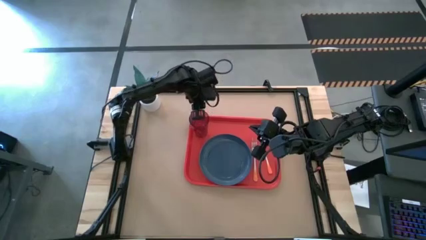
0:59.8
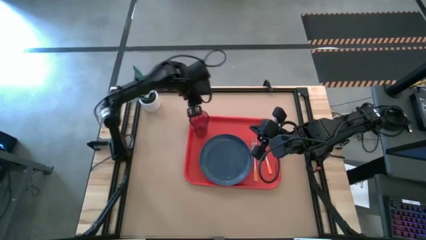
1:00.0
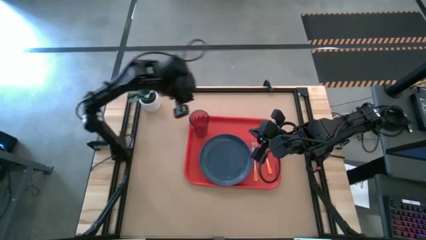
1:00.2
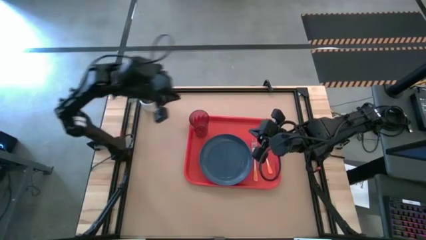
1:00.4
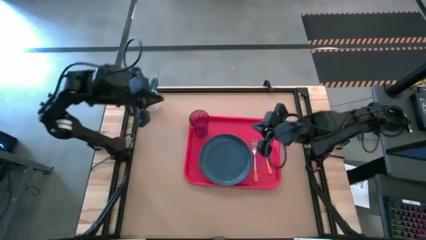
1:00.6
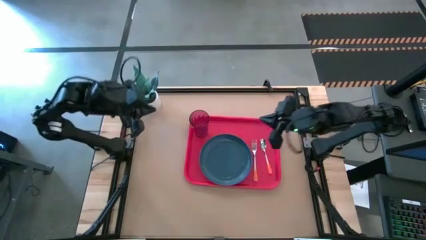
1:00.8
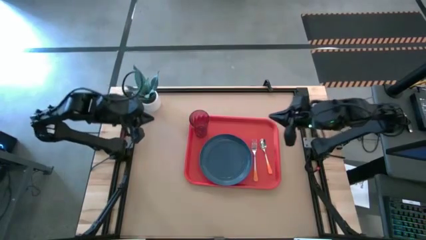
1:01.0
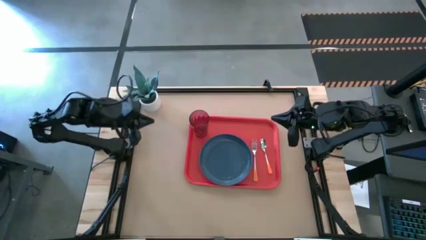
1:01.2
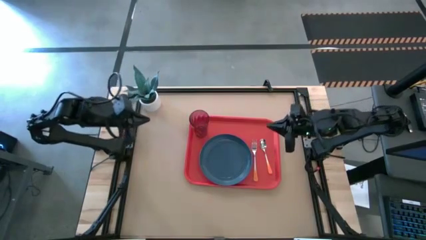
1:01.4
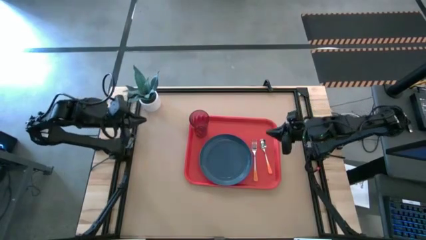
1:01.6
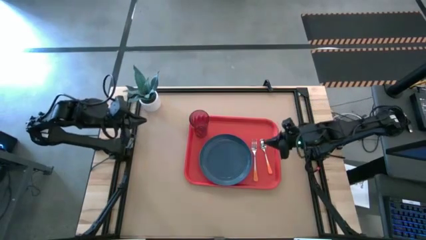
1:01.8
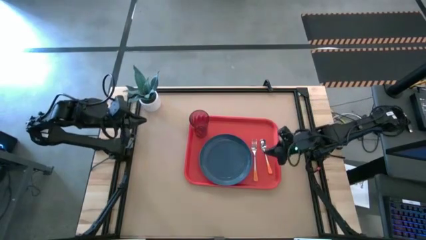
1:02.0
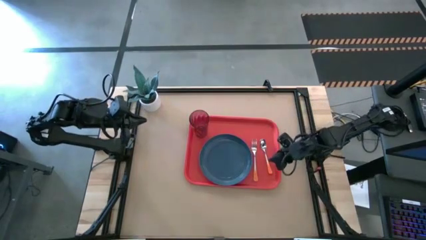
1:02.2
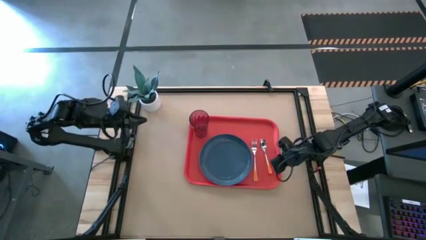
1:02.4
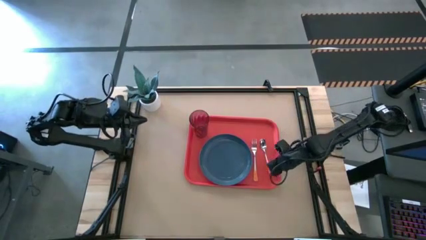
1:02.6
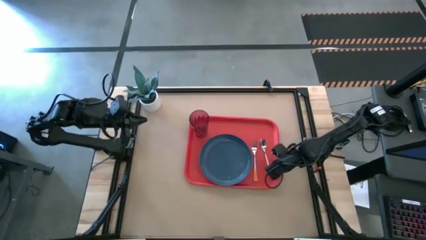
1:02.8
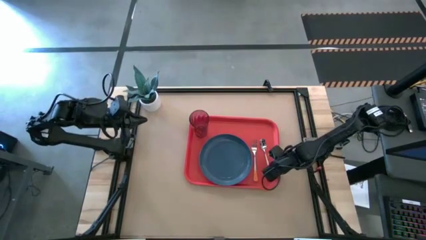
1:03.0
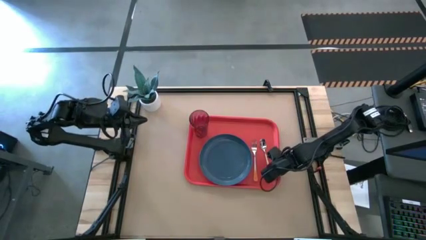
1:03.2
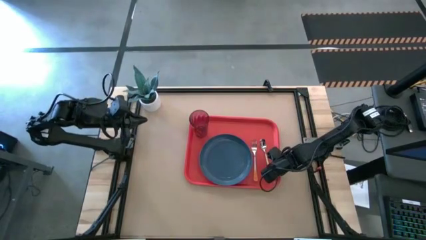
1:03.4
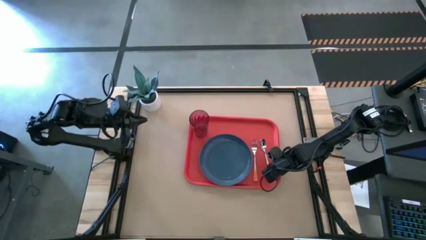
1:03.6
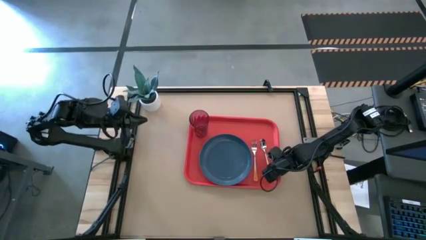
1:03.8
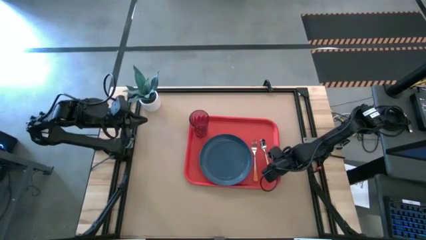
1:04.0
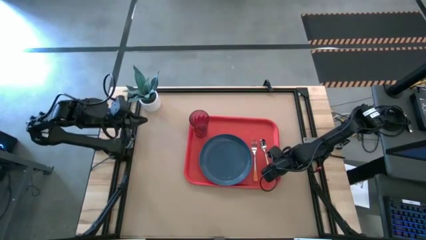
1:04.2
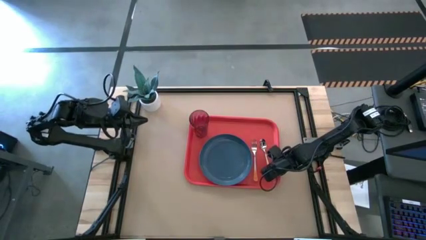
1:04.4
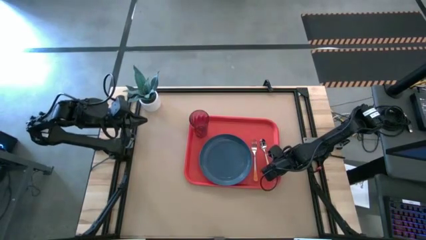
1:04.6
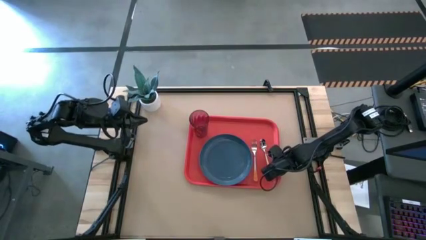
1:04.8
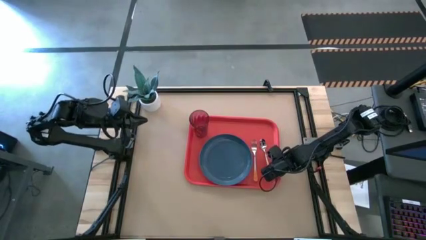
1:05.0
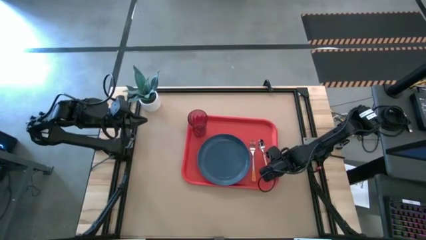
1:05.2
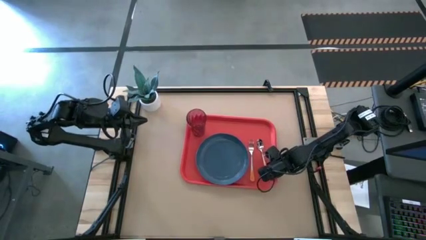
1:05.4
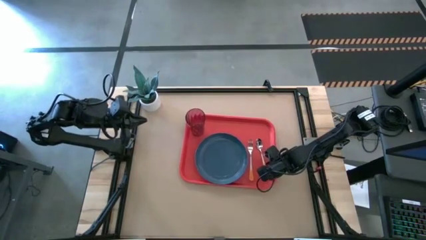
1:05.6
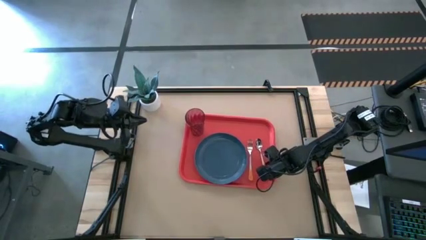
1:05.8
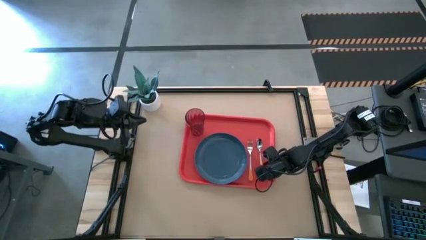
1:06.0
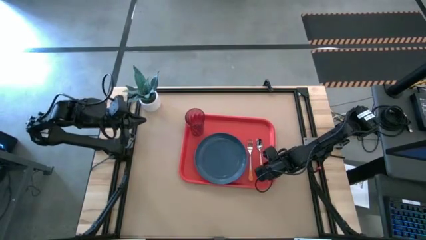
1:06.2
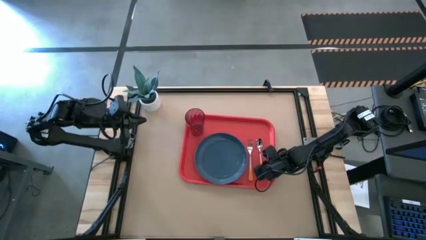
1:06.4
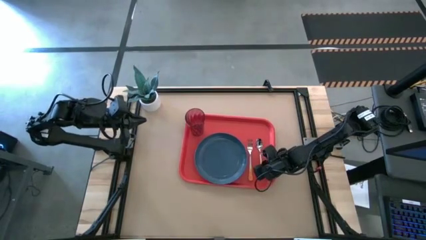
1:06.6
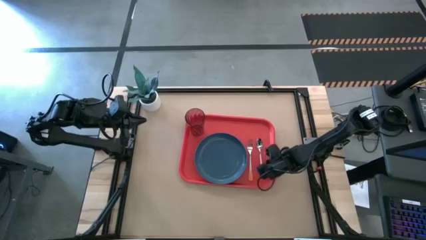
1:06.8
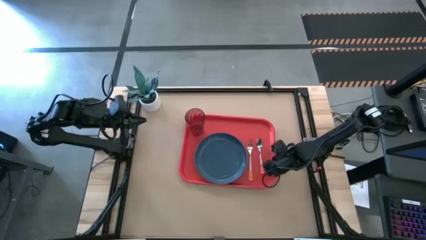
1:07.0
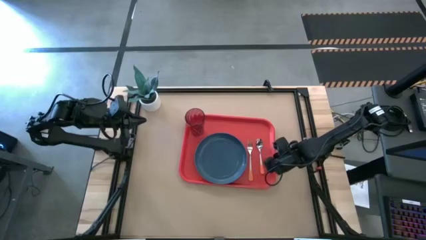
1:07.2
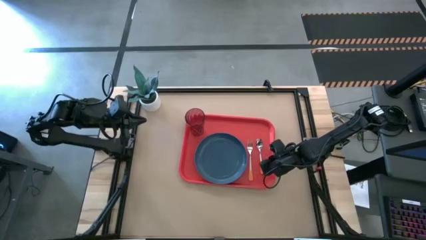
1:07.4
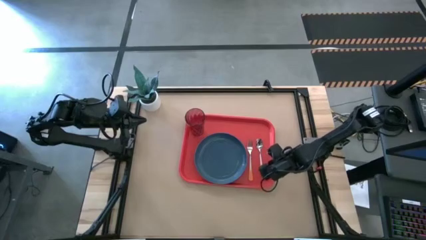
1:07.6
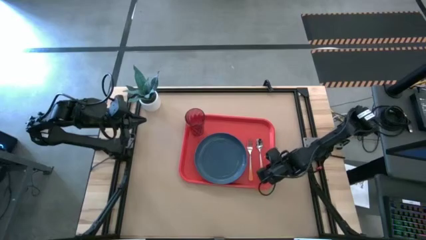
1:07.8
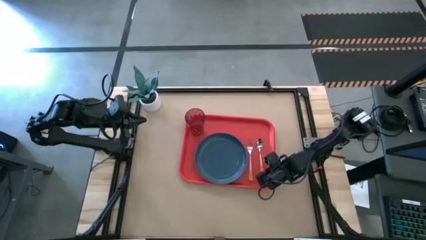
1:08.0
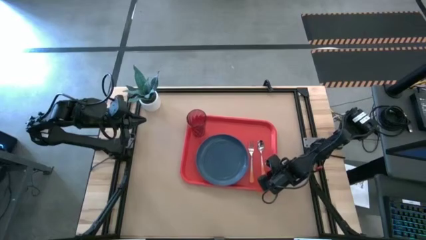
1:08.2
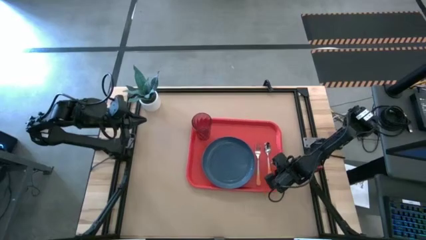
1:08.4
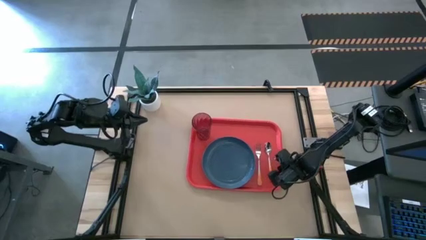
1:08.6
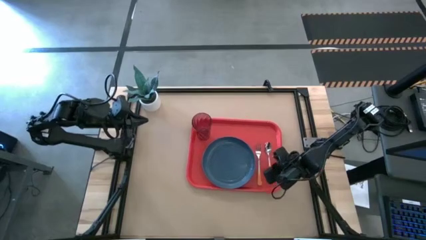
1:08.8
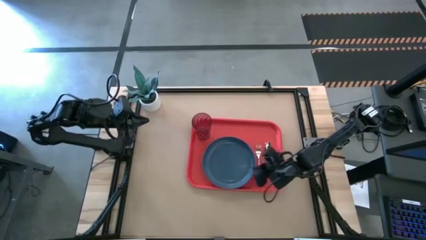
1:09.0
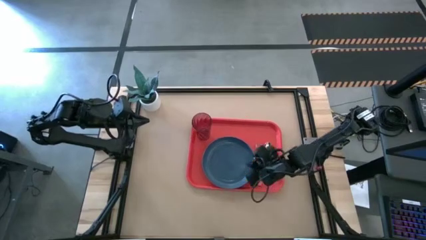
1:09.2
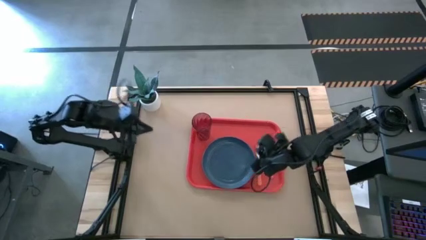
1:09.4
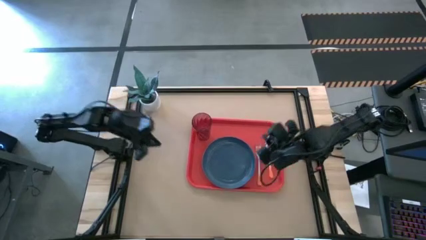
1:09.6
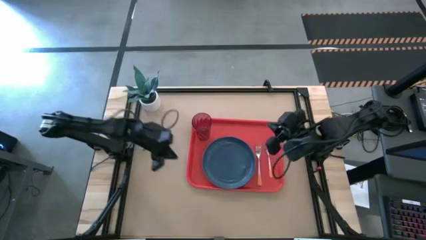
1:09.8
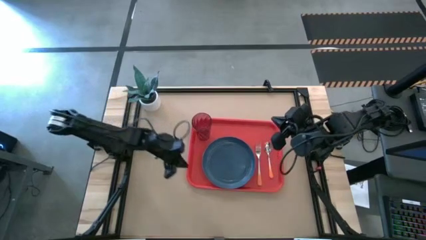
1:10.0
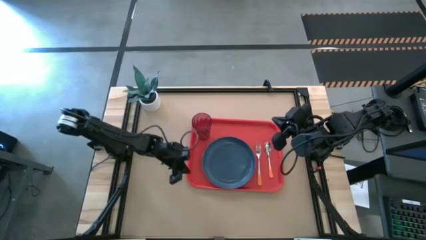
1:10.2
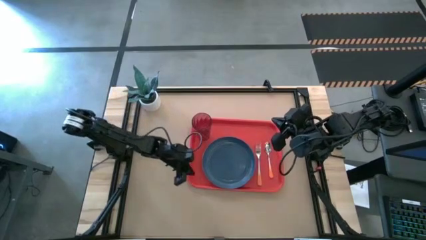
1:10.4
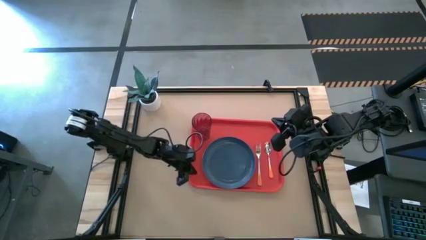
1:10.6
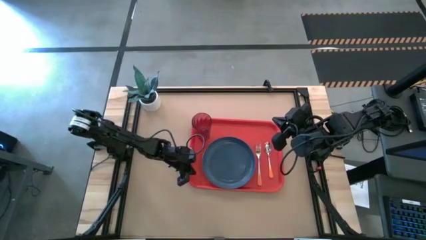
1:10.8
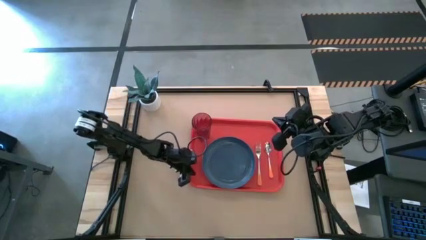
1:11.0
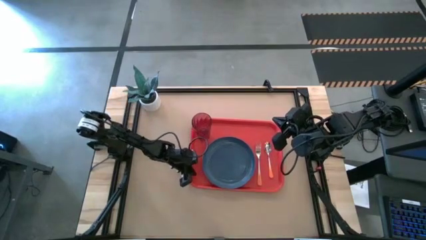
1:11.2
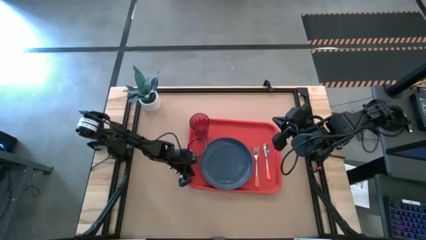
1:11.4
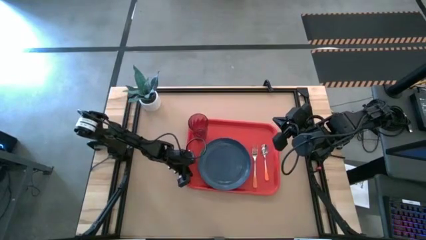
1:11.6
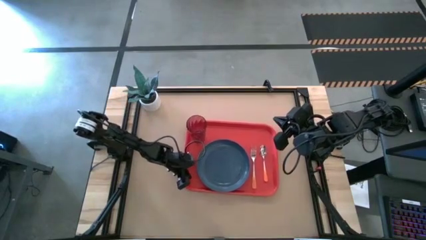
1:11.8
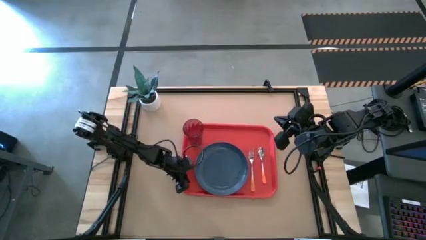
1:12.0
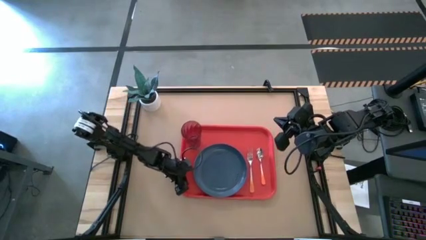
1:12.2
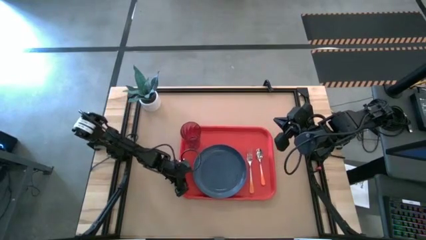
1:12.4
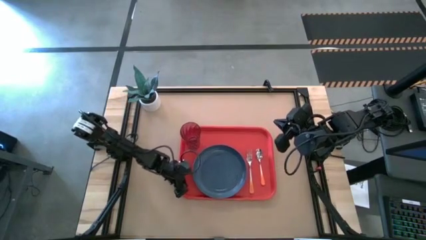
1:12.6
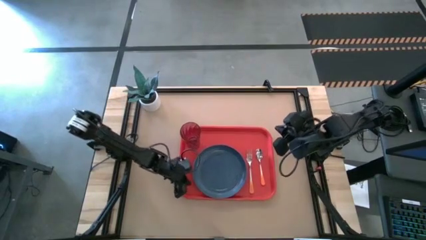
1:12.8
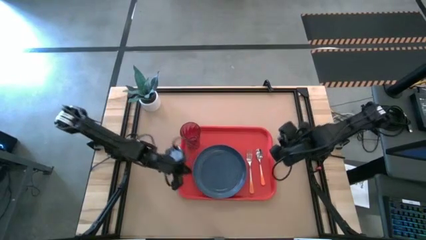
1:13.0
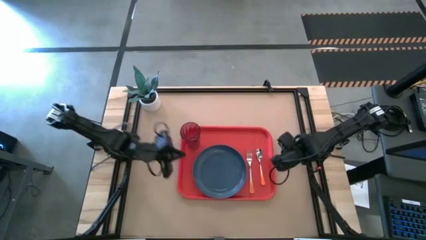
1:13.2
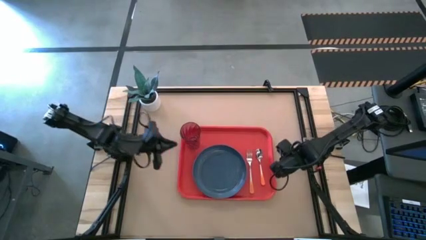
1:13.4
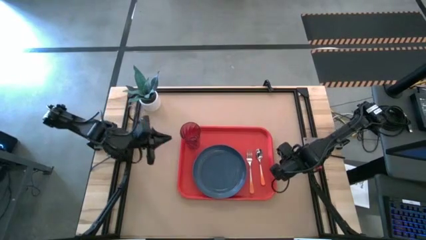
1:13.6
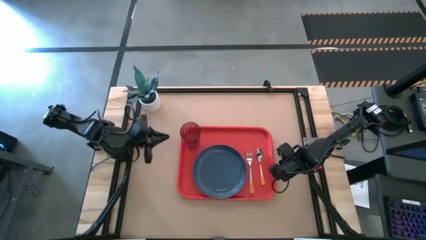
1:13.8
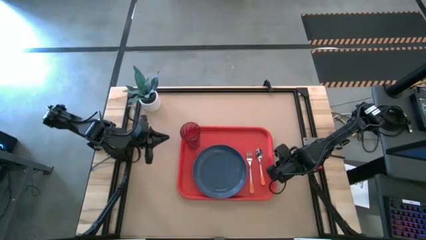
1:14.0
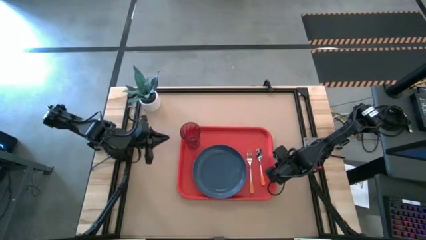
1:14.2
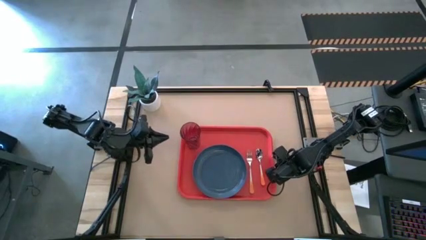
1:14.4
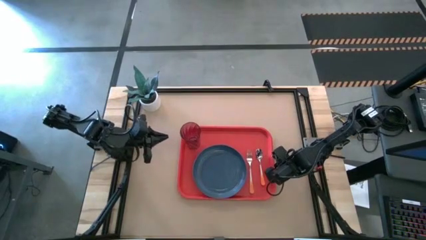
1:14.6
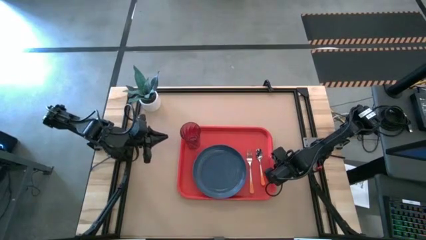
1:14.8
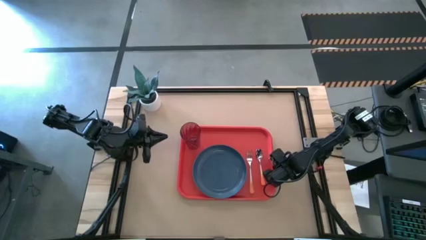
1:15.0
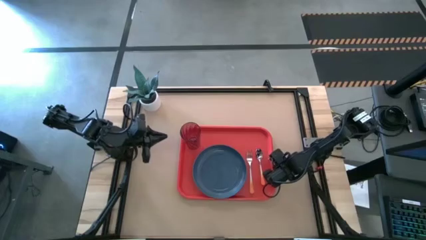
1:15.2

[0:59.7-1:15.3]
Task: Pick and place plate/cup/fork/spoon on tray
Adjust the red tray

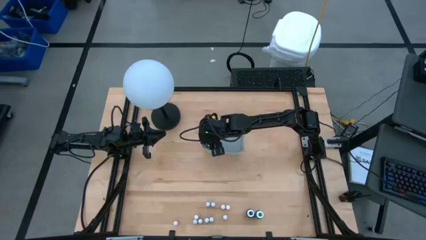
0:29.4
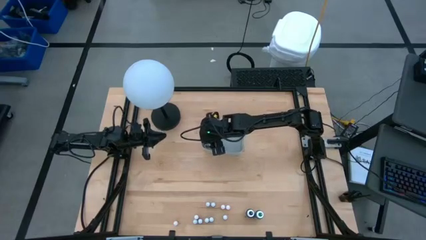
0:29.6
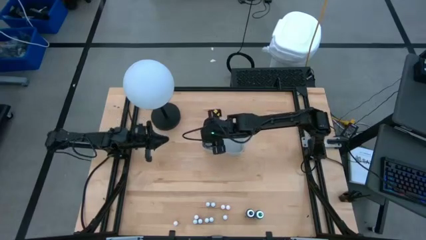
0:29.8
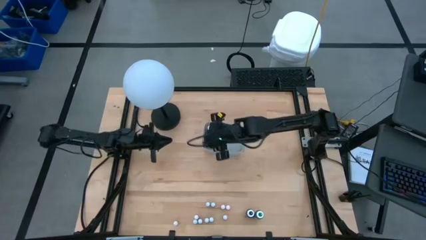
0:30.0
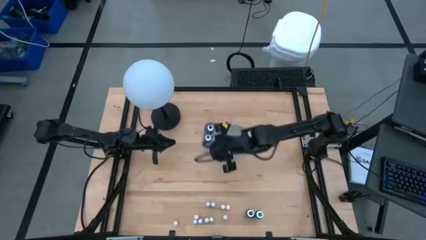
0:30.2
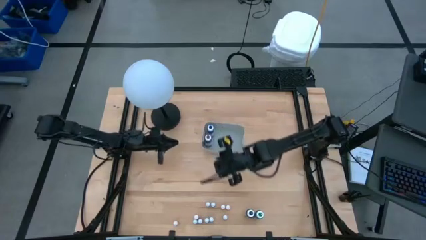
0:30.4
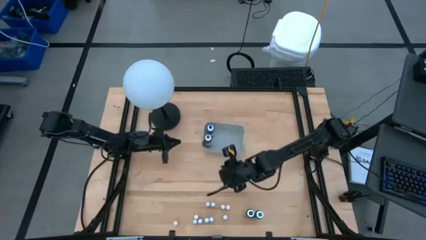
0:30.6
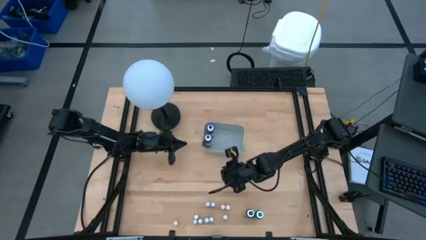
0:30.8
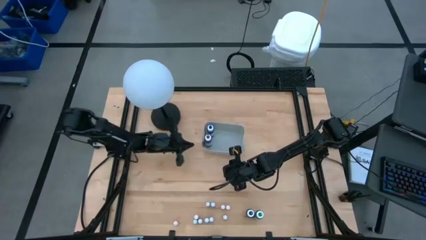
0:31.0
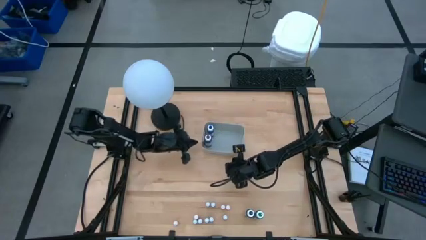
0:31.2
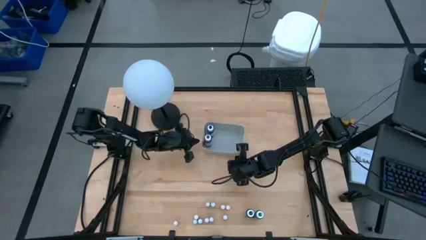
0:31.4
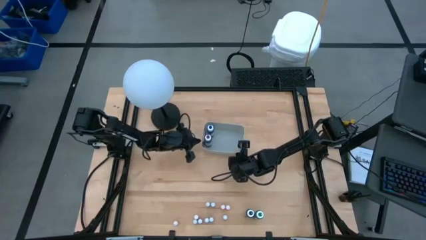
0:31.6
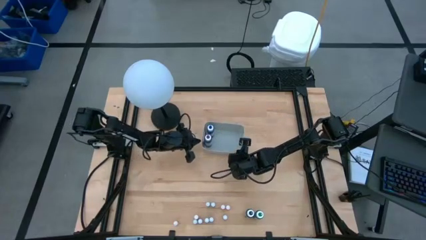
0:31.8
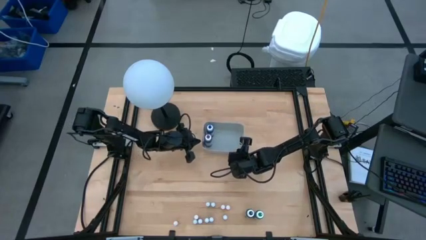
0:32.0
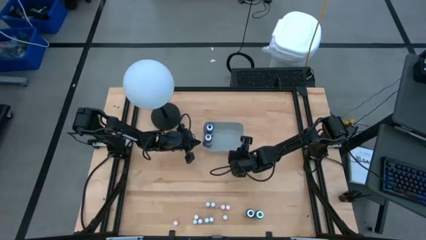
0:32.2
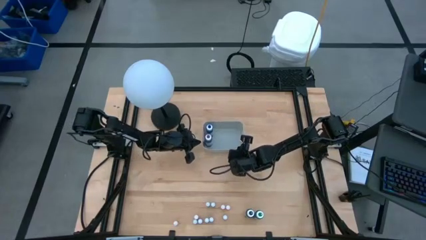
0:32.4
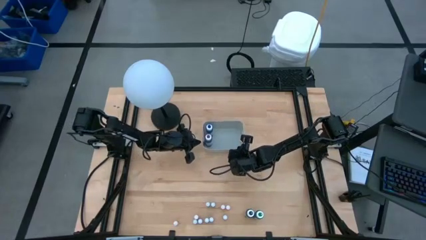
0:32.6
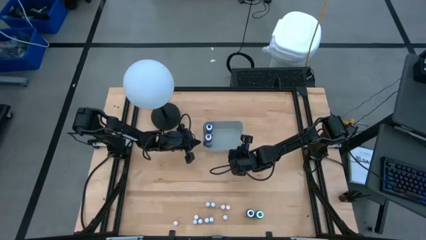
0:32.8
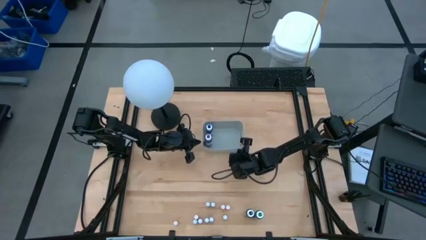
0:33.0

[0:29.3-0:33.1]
Task: Pick & Place food coloring
Adjust the gray bin
